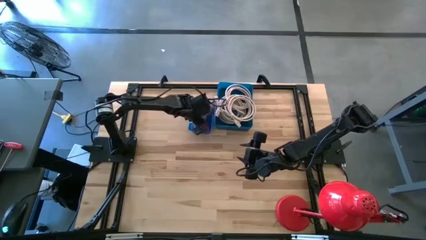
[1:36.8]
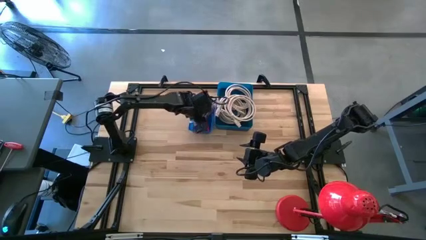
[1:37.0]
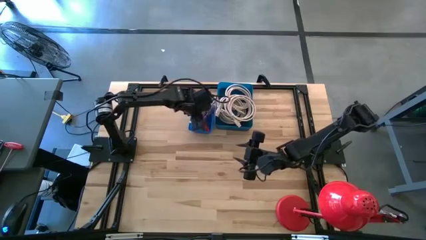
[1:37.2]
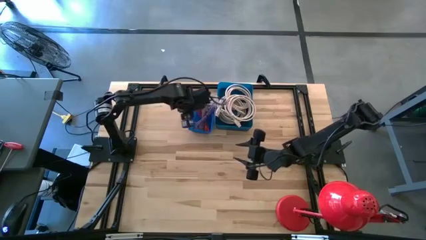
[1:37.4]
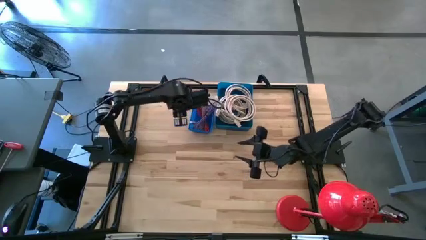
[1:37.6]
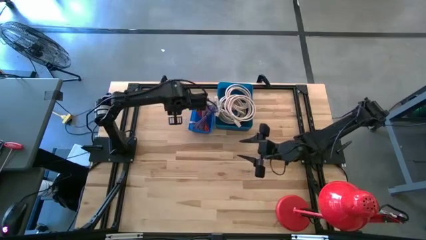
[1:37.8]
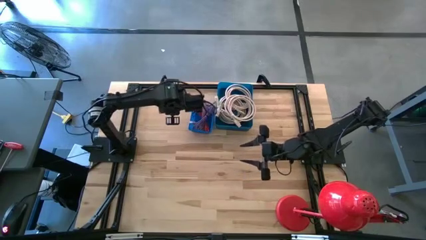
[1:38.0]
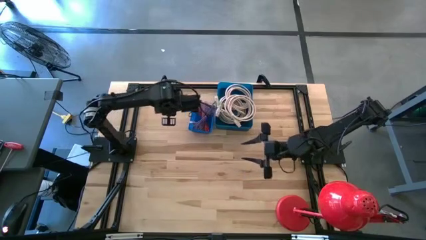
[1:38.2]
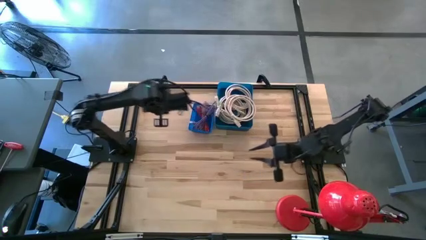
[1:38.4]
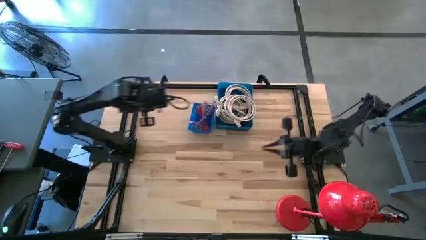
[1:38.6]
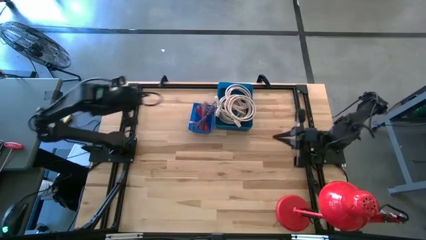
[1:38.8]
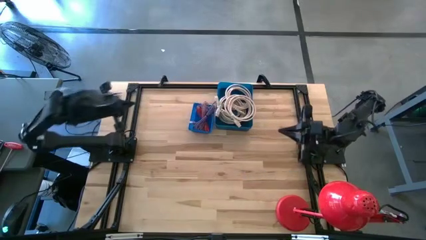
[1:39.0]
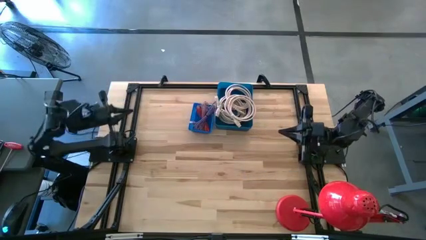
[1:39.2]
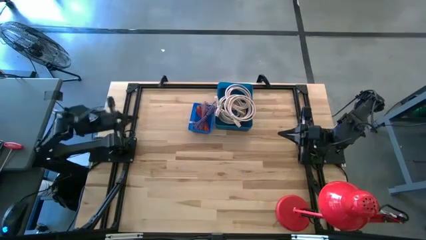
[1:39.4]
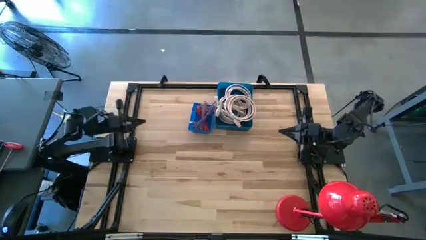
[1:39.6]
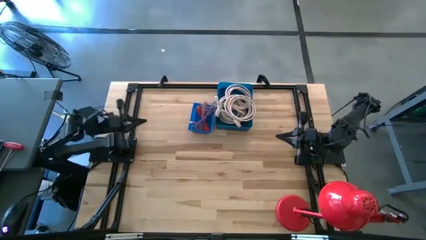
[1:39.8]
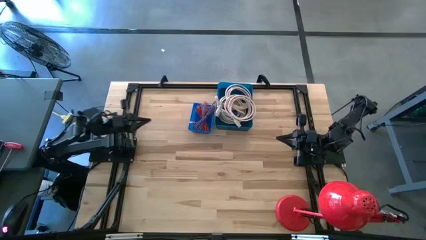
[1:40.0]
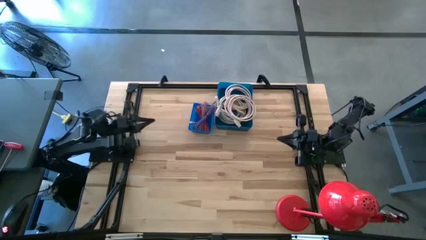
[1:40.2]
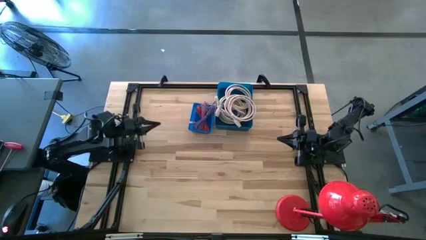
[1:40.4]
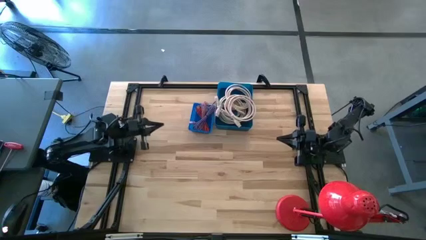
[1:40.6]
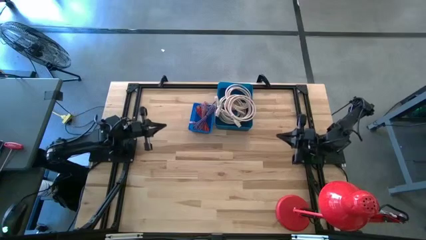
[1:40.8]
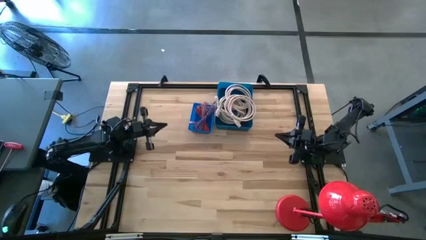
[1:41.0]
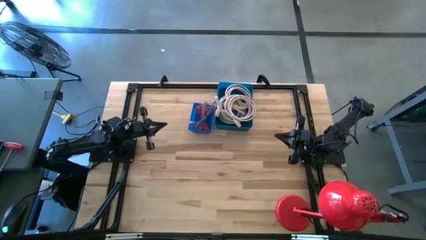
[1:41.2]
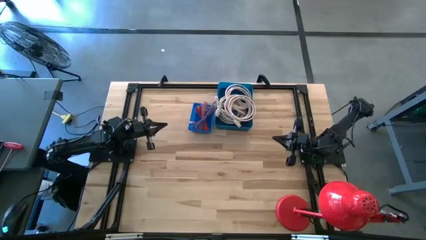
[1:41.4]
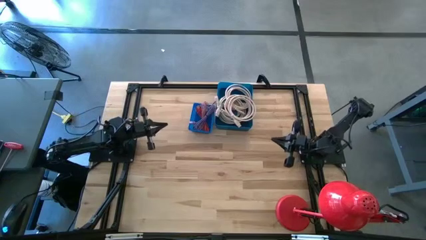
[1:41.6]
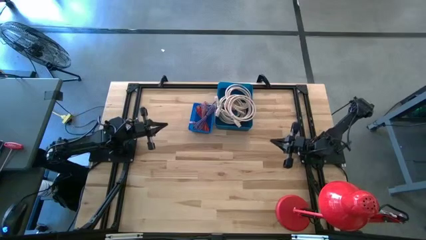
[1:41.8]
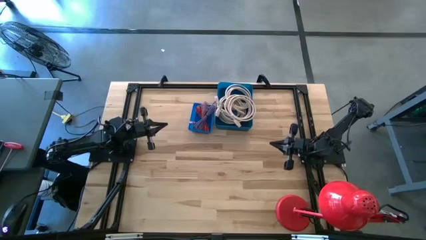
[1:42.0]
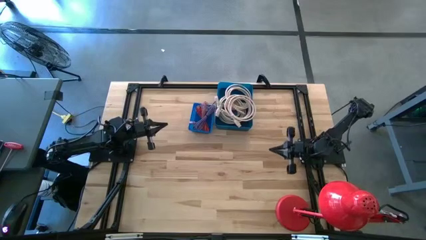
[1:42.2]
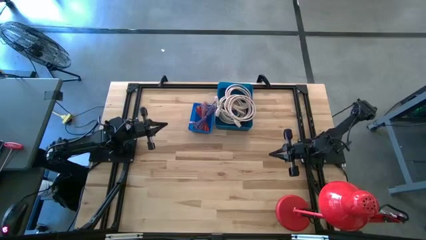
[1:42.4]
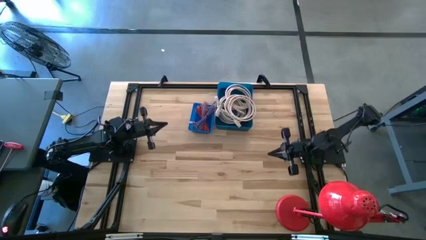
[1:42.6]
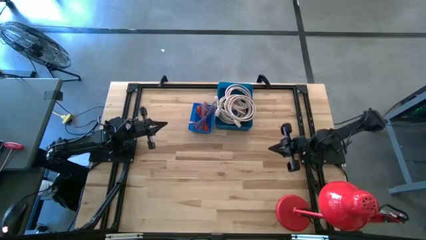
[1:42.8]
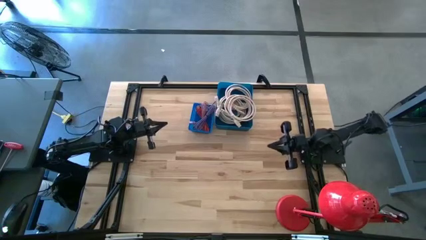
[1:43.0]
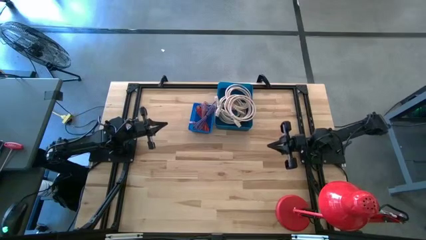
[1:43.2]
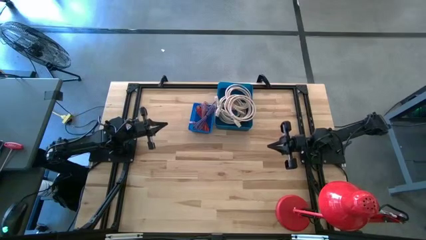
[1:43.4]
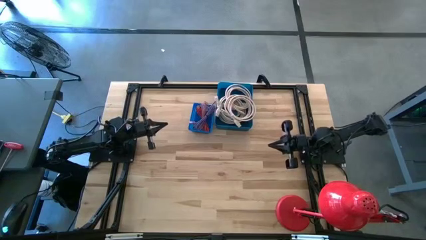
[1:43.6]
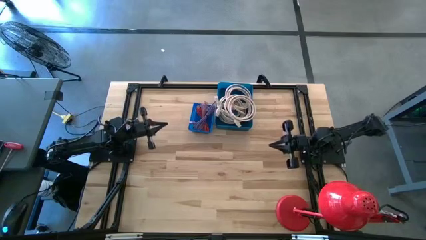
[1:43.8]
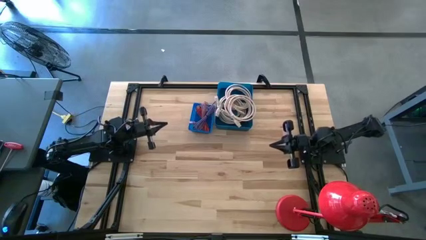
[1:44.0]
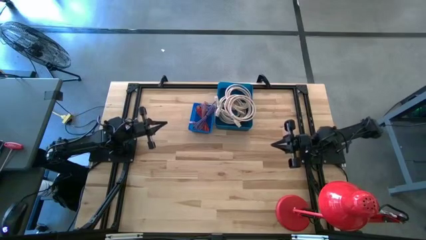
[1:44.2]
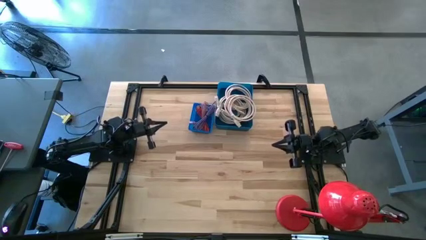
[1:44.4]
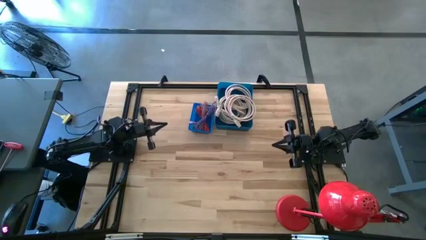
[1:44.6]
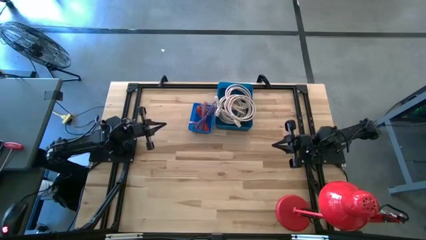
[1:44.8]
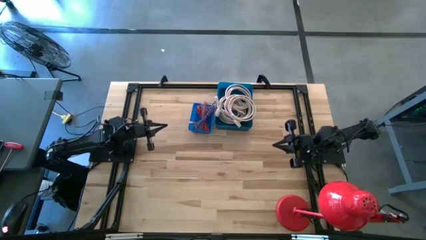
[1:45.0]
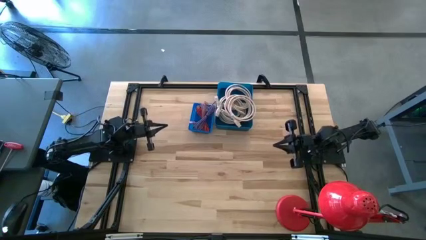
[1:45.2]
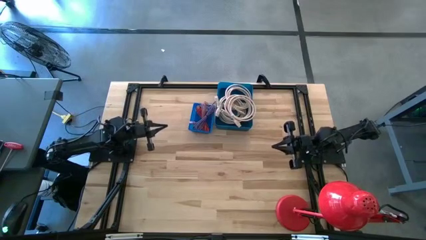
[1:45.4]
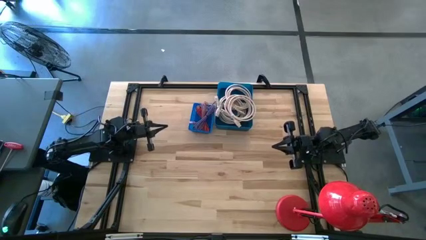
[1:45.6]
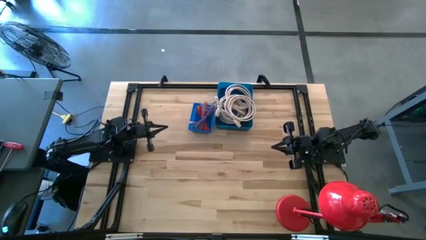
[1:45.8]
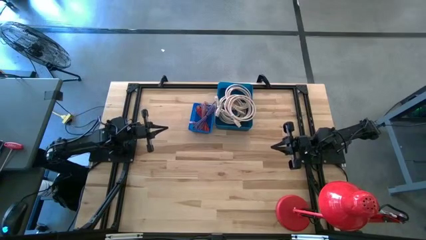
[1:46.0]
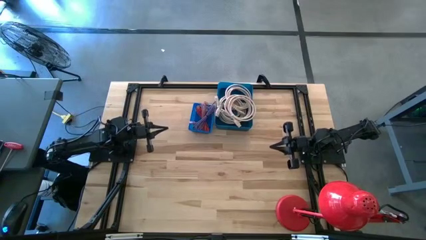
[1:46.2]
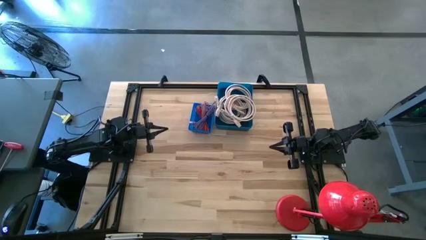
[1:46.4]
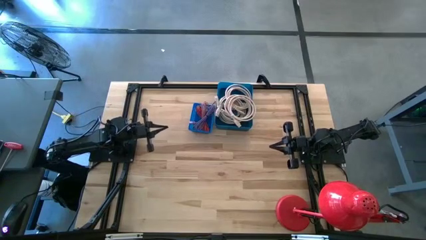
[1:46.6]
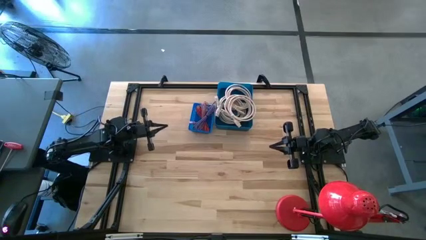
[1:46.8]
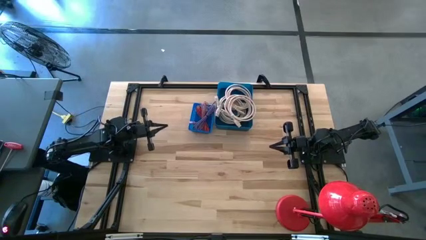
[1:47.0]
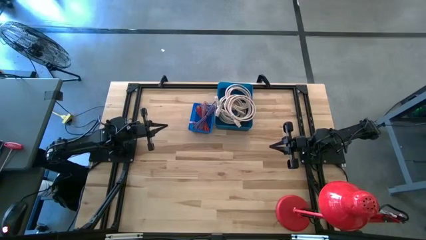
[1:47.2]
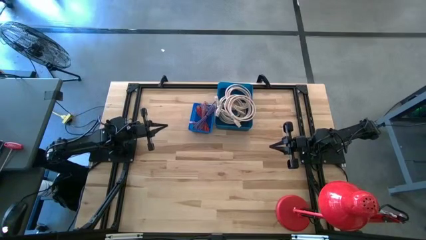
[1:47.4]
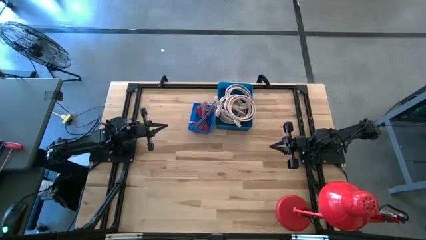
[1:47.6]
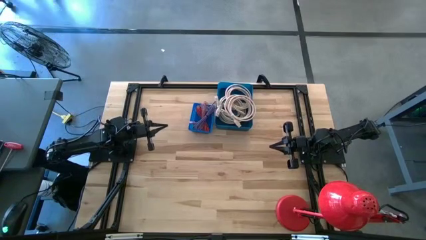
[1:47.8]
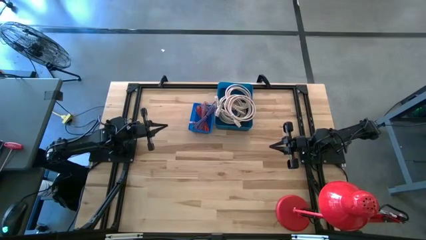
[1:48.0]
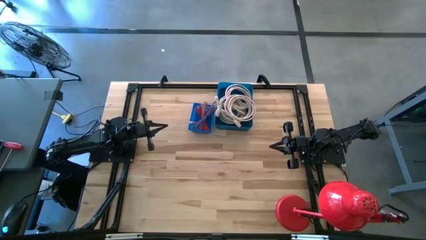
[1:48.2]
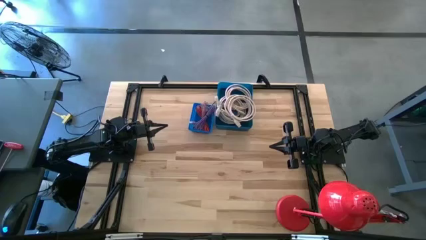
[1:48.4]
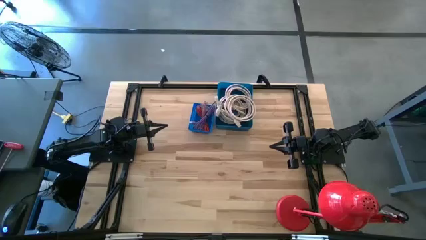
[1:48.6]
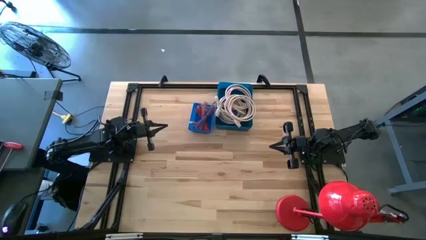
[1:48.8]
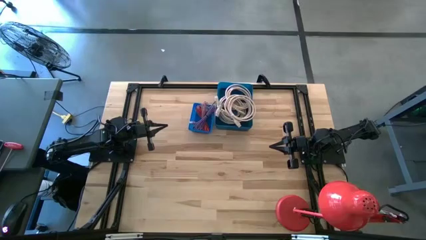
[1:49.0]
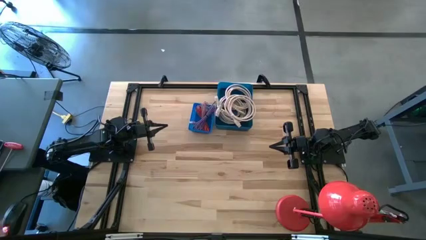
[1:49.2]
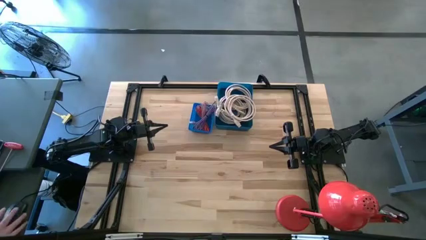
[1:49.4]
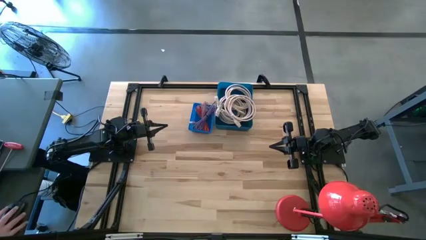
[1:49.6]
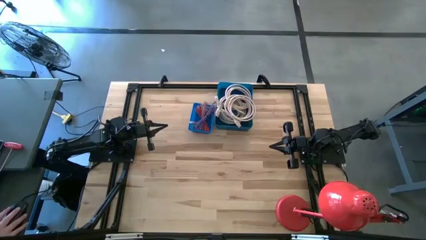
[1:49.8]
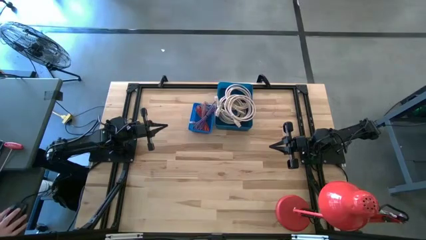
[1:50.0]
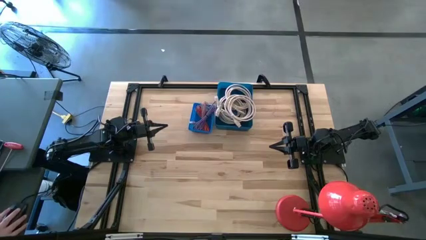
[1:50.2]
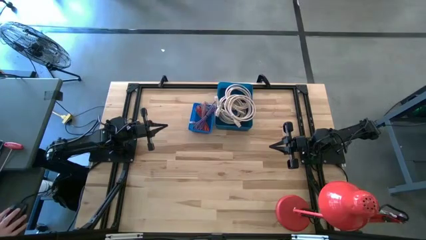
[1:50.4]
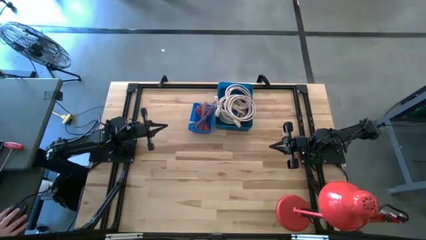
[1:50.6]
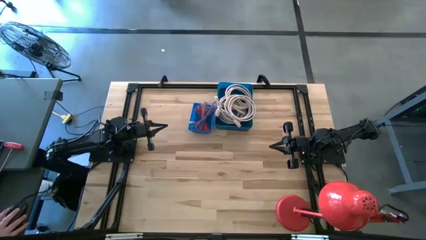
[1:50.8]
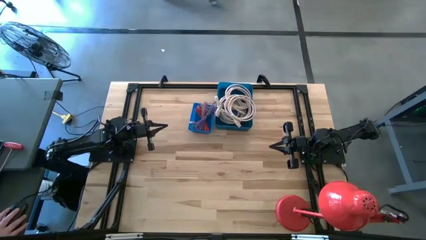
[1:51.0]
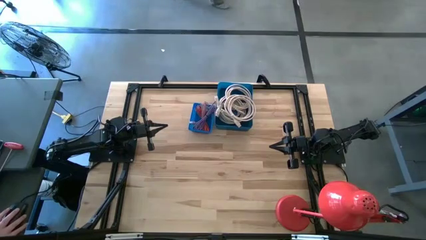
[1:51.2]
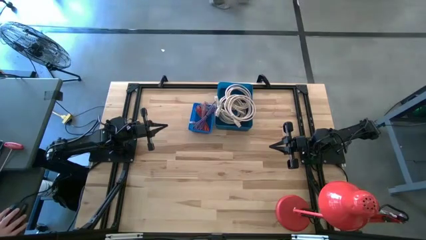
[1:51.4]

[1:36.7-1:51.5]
Task: Pick & Place USB Port
Return to Home Position
